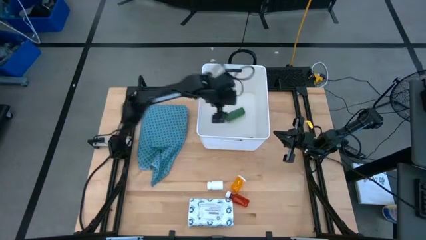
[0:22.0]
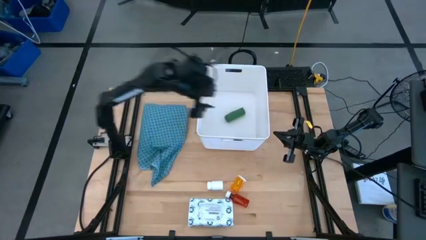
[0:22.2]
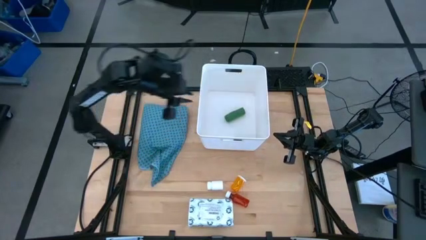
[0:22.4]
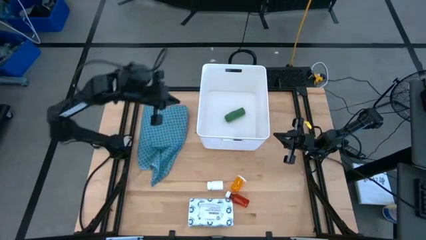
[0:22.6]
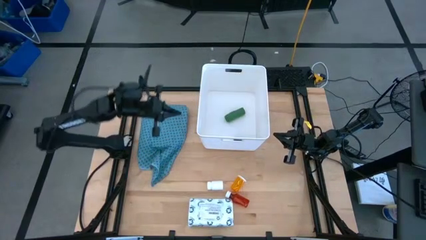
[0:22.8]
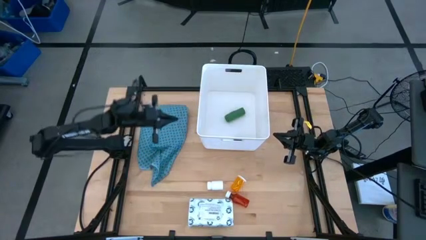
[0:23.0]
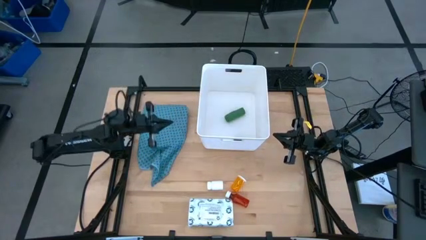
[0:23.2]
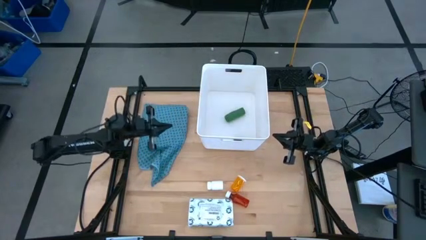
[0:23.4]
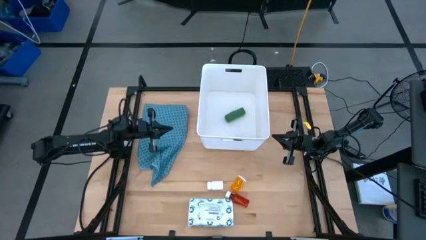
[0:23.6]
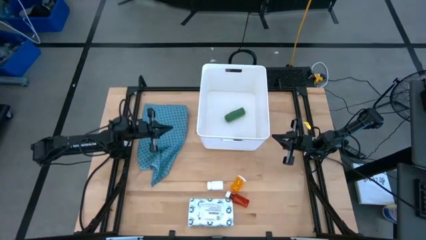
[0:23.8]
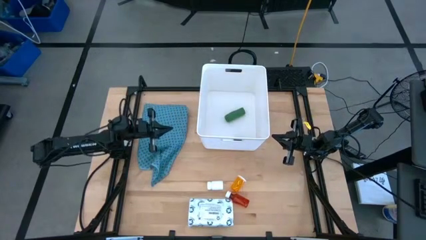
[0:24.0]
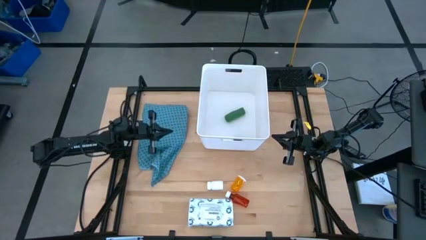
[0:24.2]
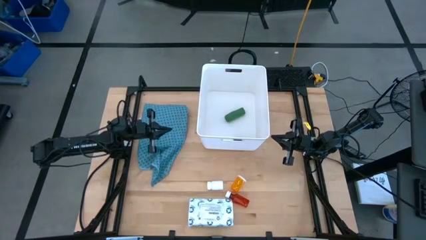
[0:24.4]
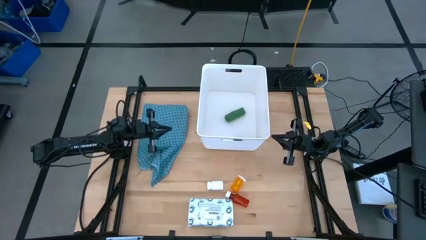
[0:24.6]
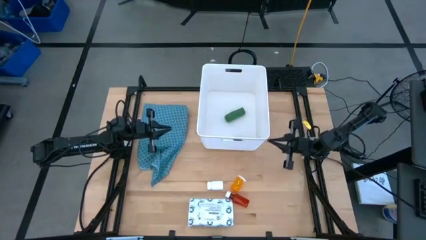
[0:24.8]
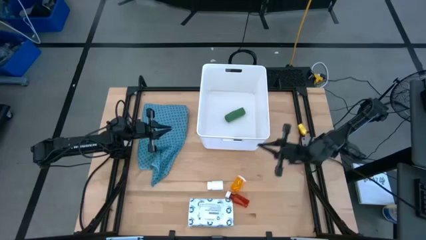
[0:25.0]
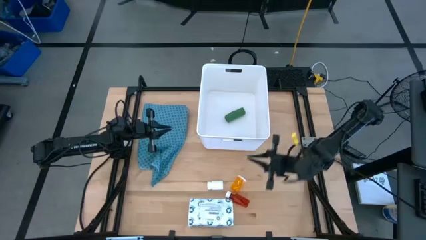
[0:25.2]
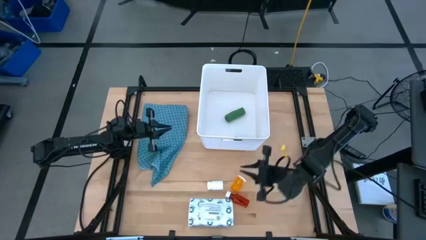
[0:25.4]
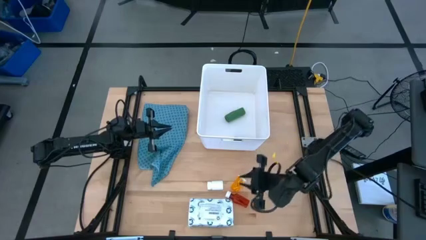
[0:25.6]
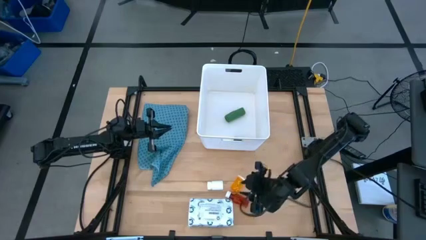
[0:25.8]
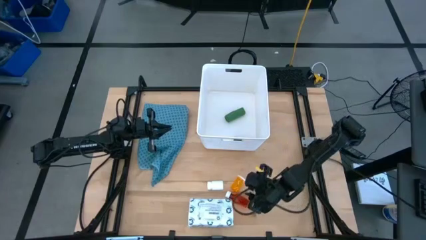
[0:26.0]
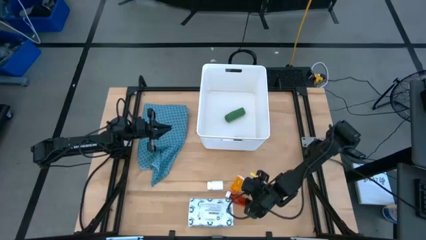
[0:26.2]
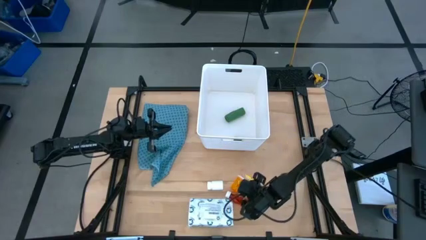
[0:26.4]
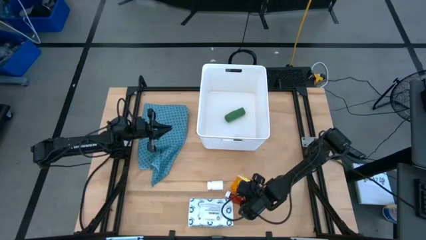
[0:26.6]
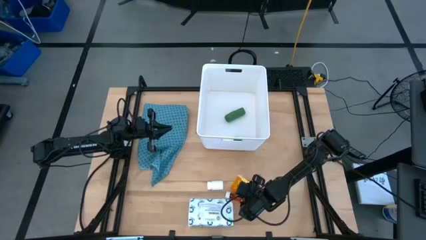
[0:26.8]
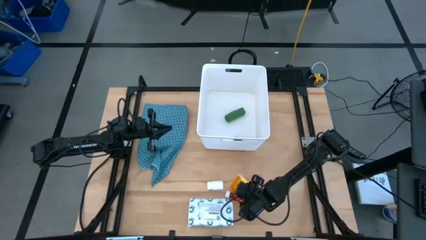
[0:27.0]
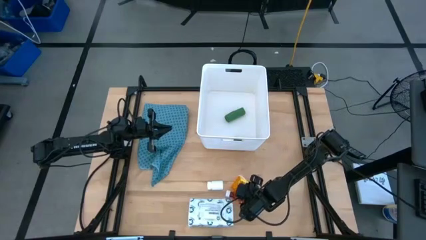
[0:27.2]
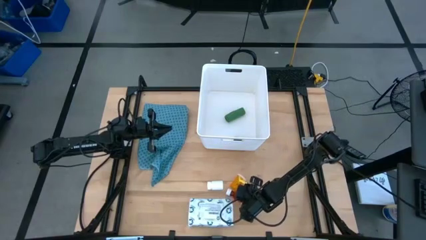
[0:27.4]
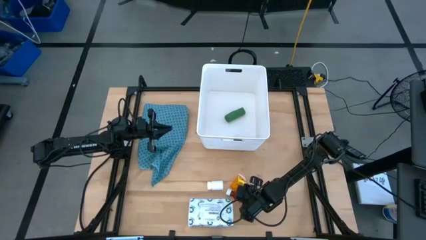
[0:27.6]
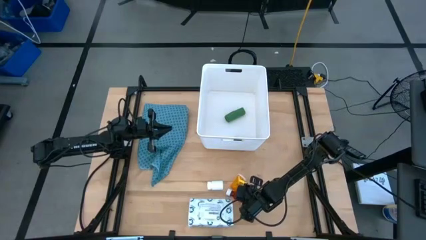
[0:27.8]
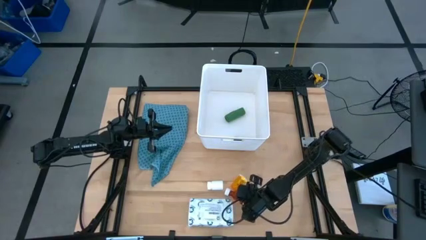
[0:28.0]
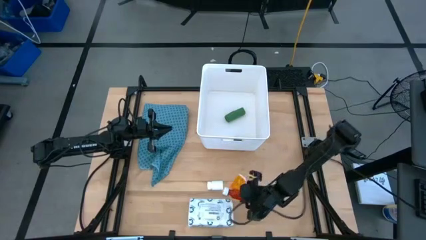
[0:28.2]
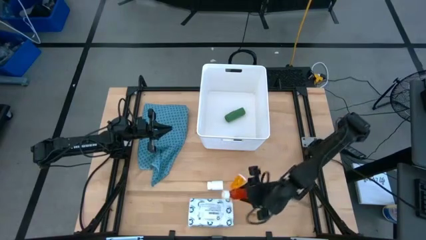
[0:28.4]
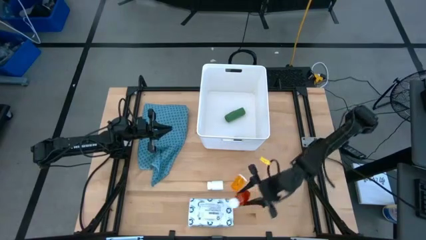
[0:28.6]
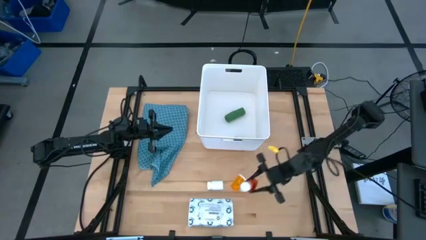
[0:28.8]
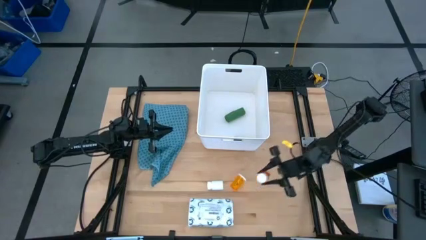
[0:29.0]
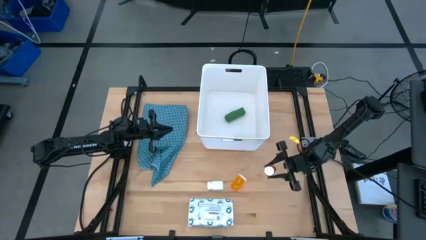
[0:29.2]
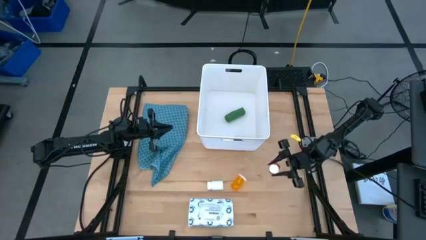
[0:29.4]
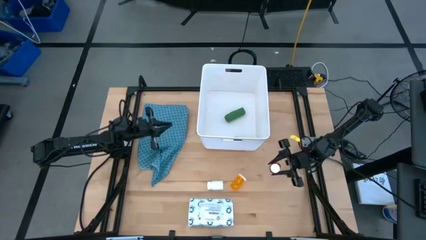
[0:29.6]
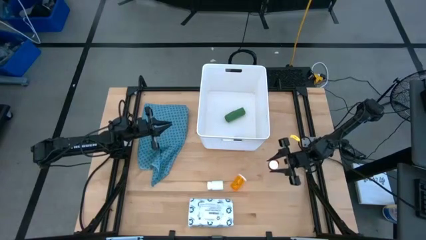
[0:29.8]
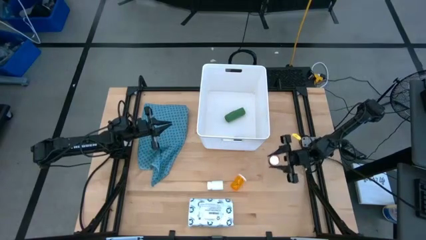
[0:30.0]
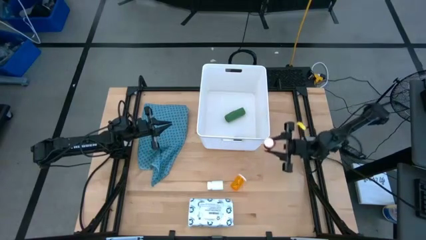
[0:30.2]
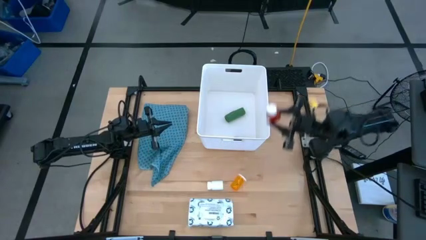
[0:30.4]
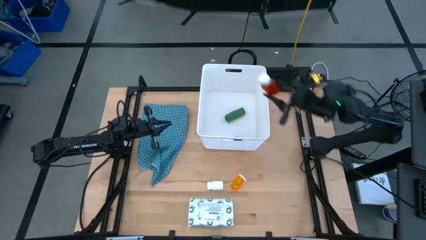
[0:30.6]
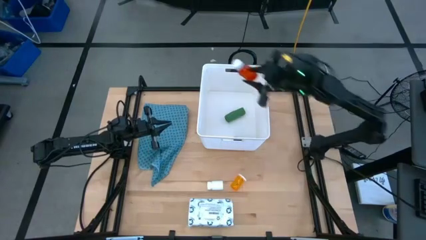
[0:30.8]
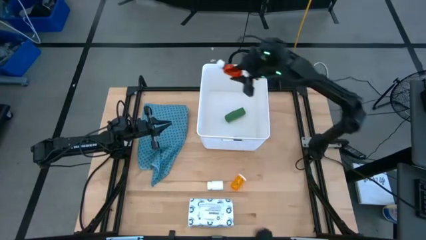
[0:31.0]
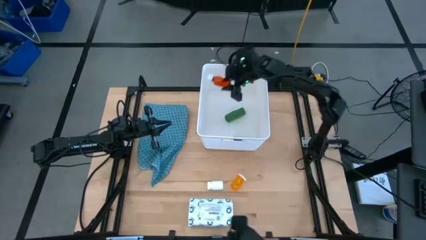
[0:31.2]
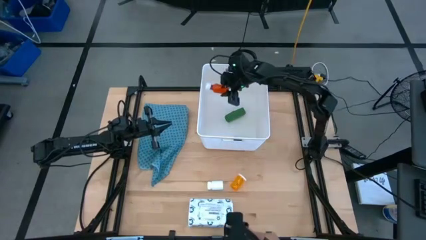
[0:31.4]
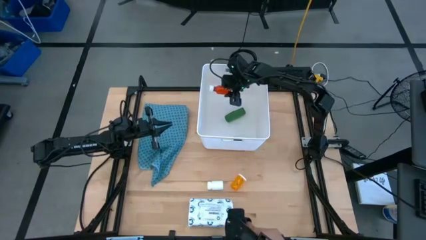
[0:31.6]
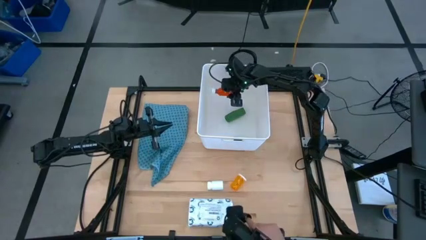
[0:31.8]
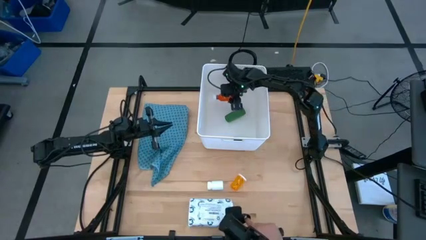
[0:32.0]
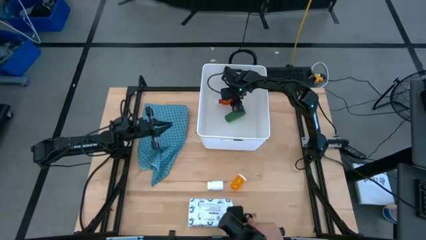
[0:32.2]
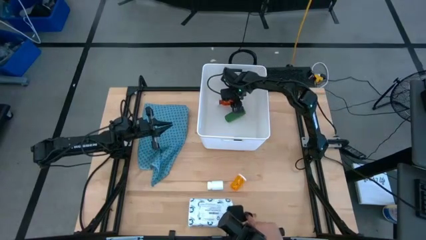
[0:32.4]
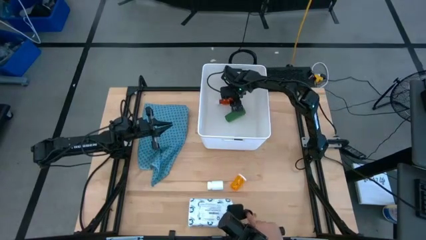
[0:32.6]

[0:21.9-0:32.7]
Task: Pick & place medical supplies in basket/bin
Put the red pill bottle into the white bin
